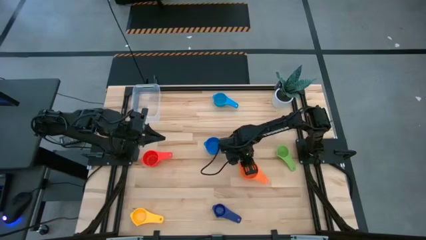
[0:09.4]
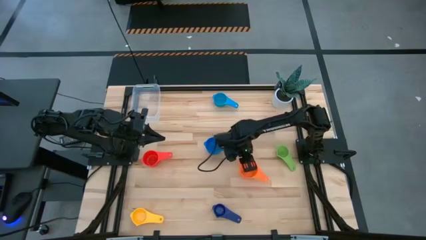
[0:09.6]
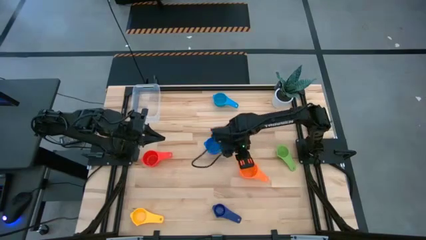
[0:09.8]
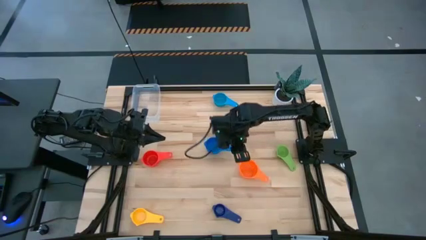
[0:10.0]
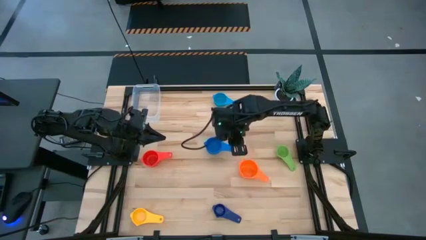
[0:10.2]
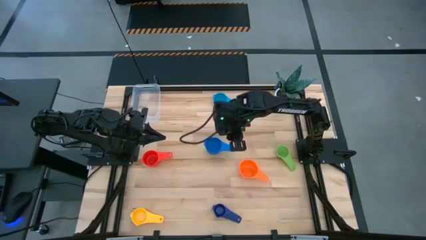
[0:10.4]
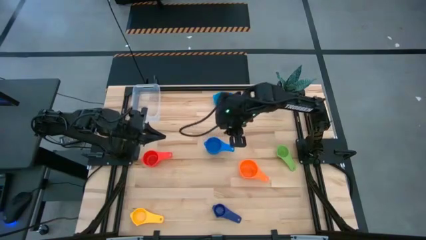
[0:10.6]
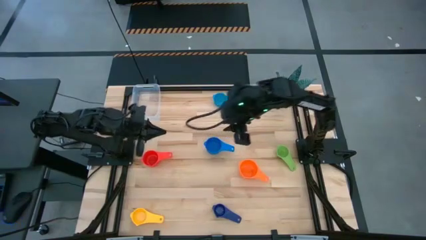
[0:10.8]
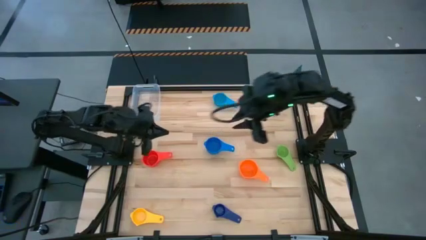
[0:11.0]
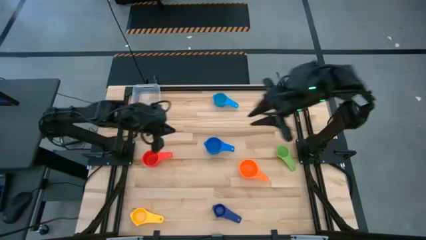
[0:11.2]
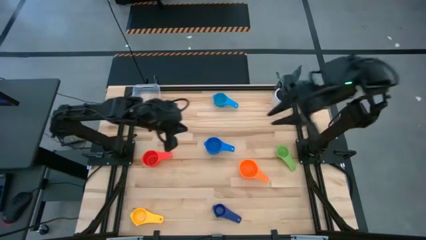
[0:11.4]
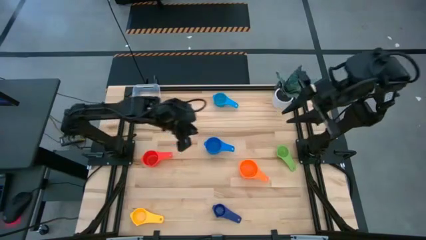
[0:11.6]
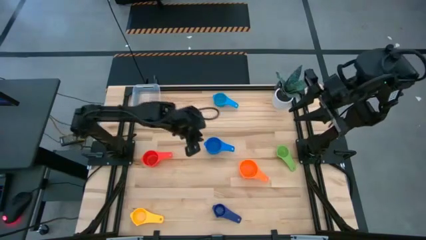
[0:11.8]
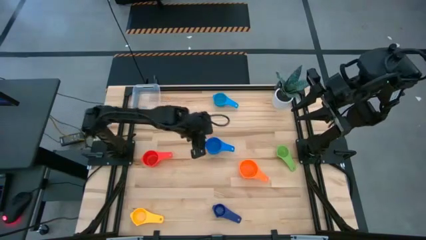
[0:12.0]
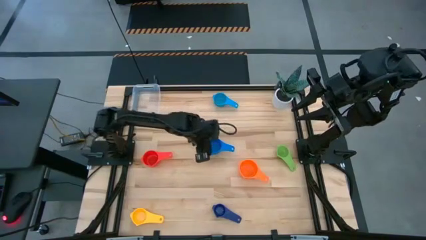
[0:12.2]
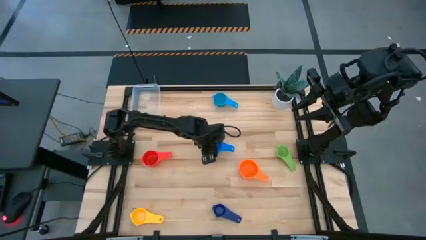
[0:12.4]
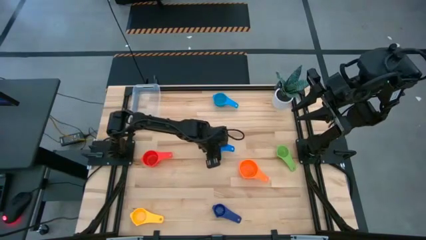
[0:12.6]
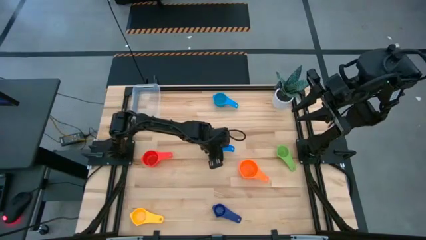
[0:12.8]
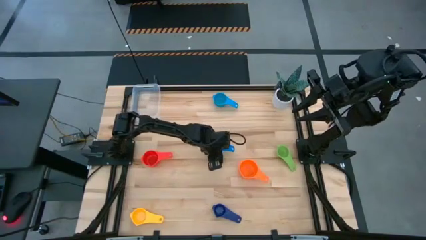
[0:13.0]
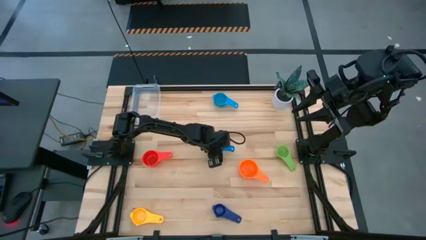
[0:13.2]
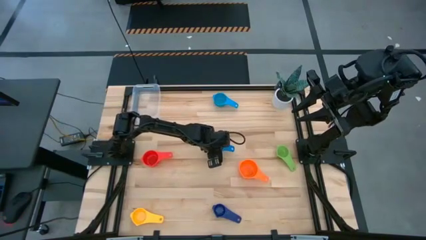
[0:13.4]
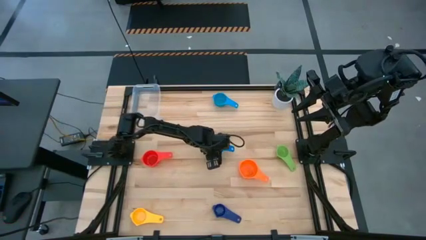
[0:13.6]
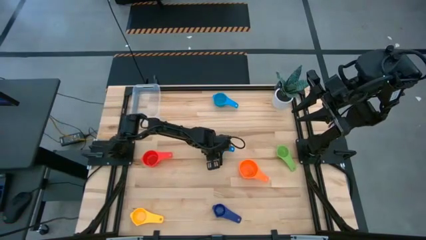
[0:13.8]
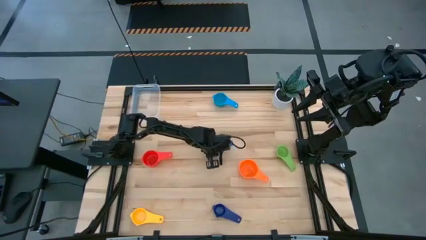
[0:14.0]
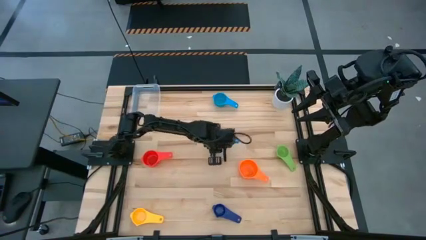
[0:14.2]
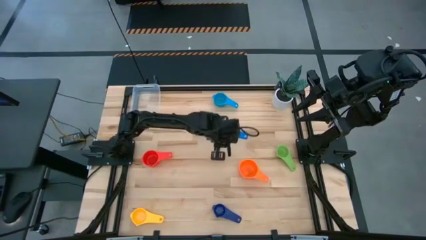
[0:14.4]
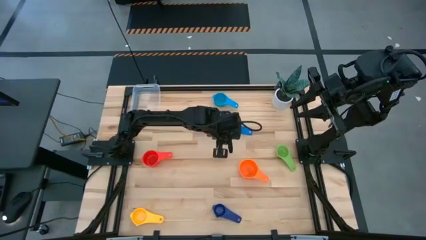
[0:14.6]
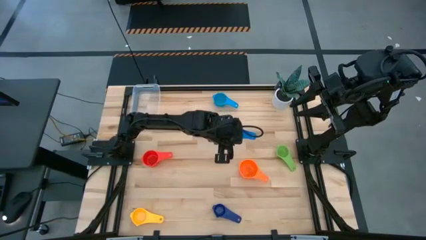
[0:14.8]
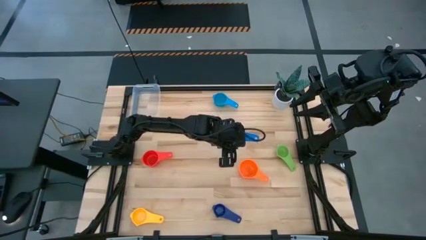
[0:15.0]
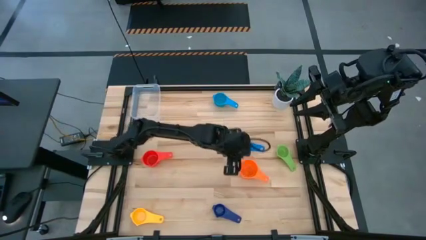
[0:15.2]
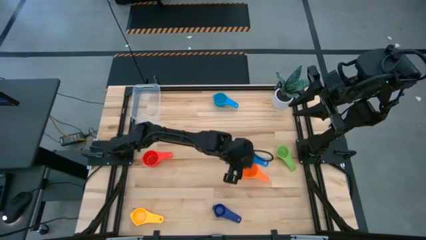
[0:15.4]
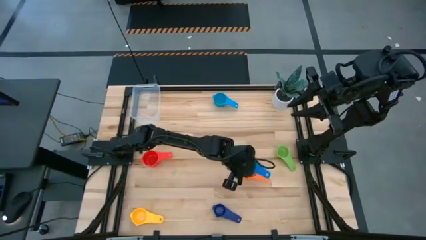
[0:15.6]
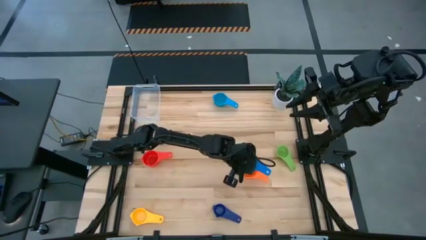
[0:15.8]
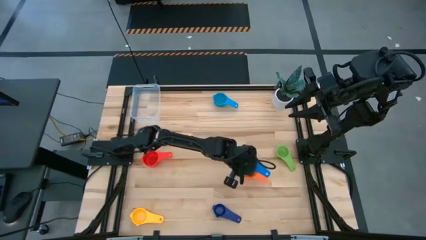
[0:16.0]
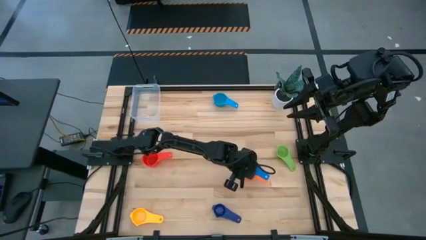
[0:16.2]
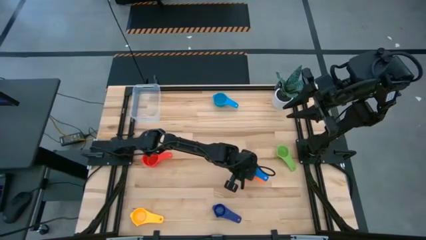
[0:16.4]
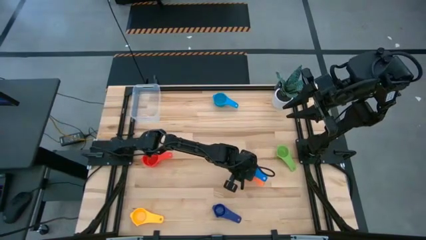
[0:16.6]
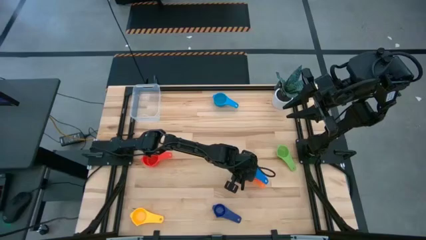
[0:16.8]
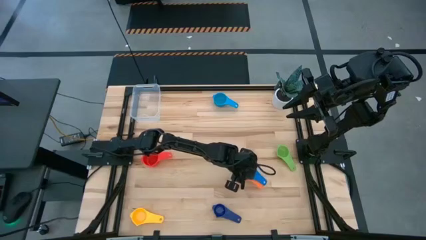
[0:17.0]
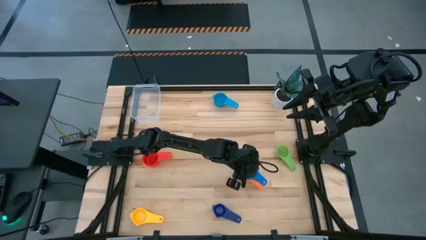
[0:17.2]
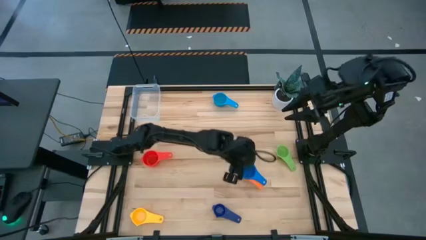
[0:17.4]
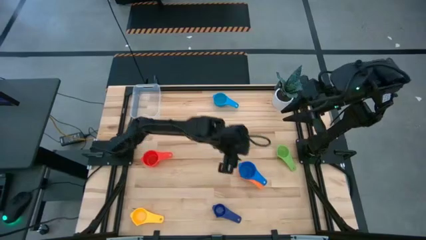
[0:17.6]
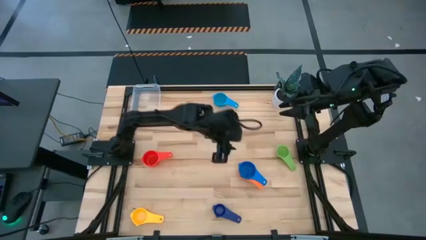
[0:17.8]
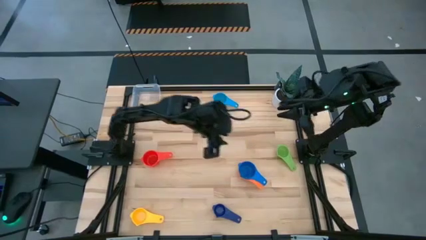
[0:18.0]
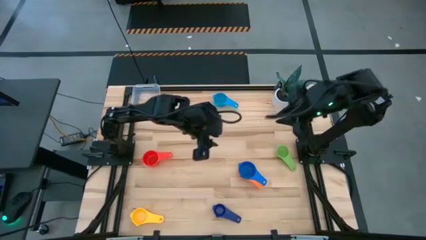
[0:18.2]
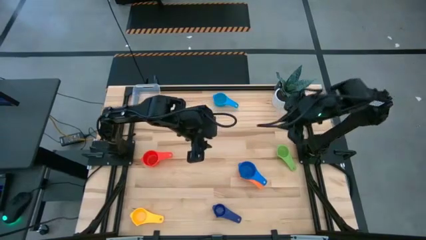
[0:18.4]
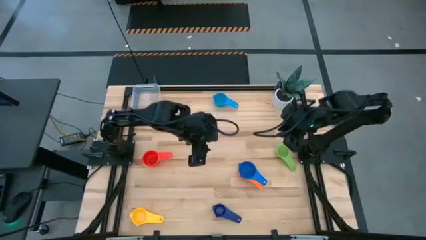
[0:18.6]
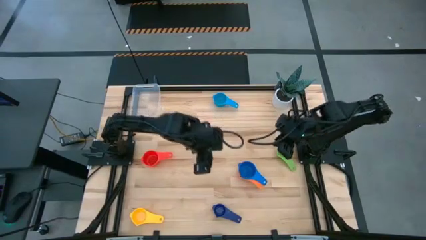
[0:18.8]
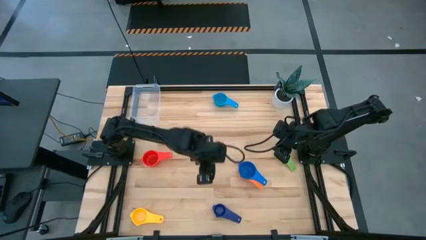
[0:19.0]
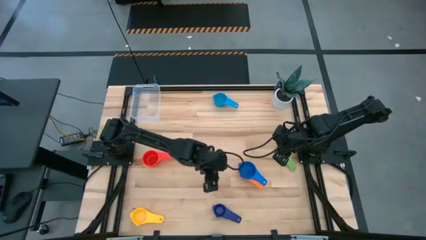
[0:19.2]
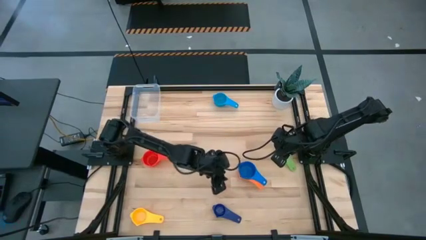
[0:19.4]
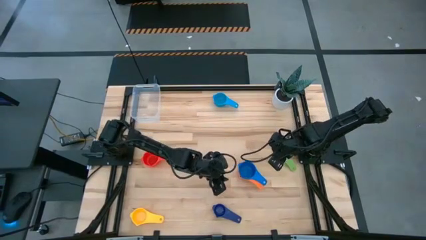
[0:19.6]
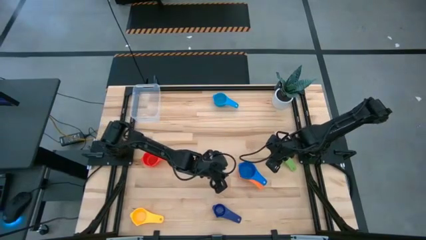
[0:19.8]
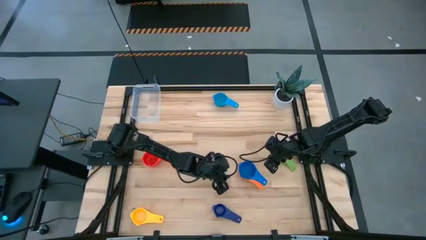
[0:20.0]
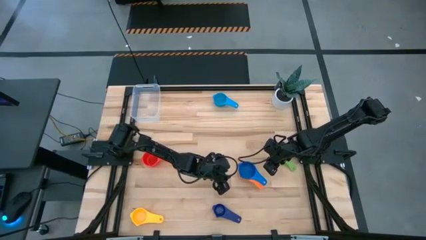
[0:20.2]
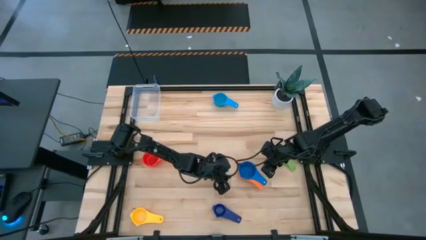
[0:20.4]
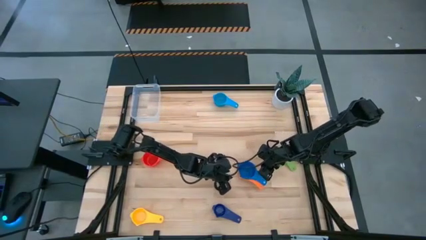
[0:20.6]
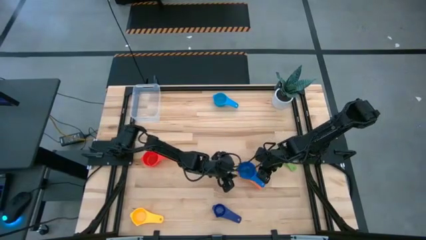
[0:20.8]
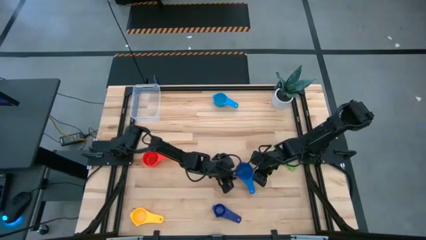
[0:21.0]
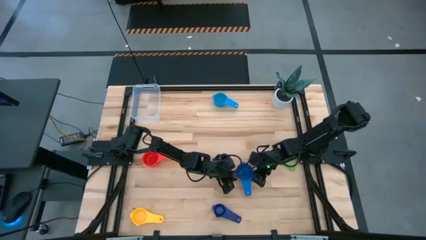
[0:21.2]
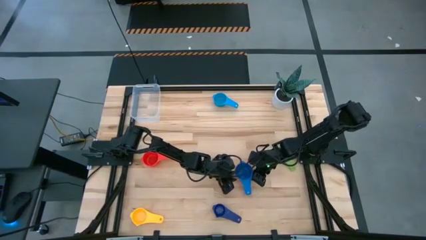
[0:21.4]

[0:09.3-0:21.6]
Task: Nest measuring cups in basket
Stack the blue measuring cup on top of the orange measuring cup

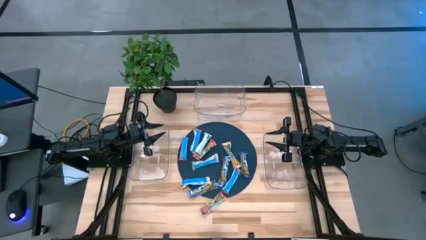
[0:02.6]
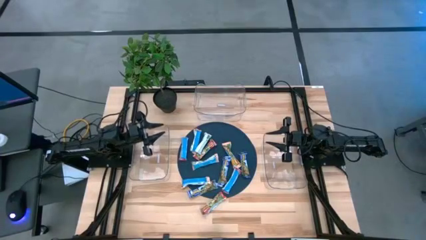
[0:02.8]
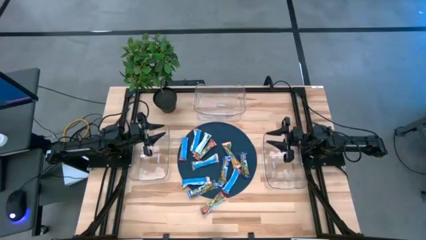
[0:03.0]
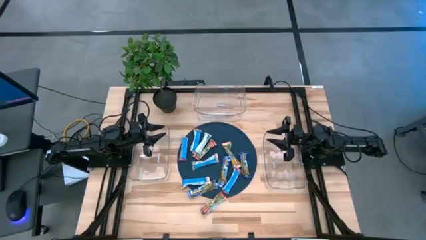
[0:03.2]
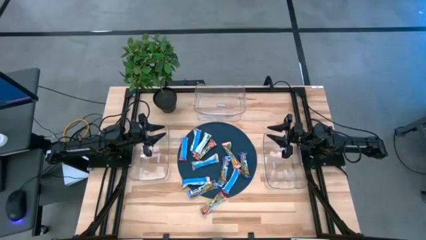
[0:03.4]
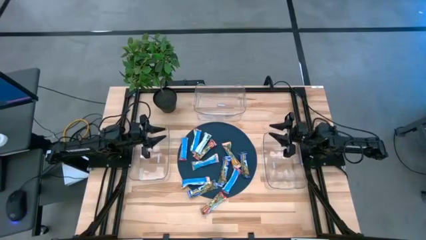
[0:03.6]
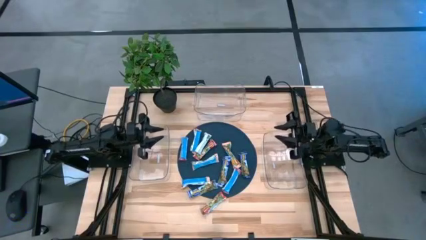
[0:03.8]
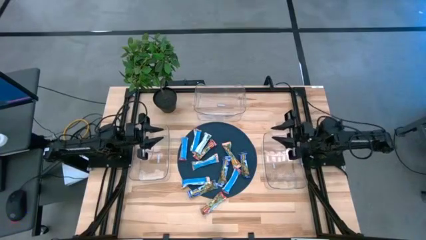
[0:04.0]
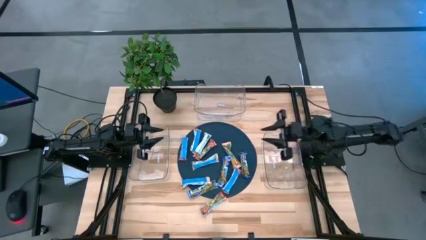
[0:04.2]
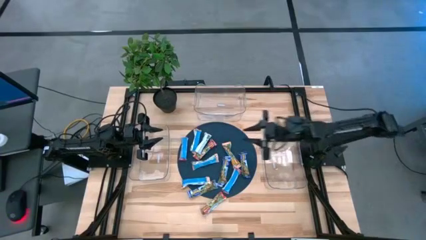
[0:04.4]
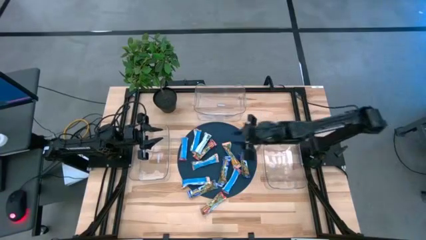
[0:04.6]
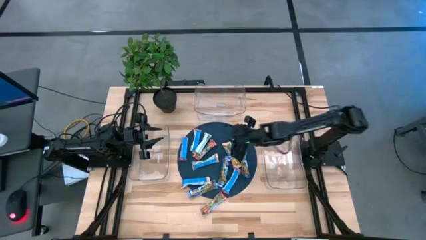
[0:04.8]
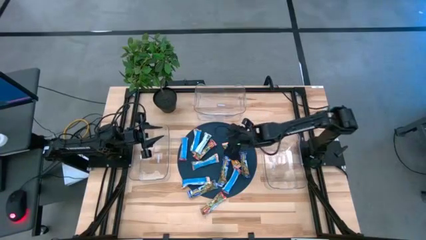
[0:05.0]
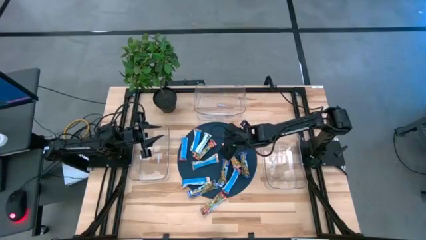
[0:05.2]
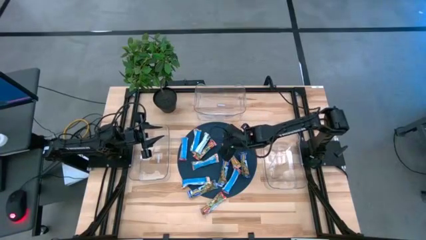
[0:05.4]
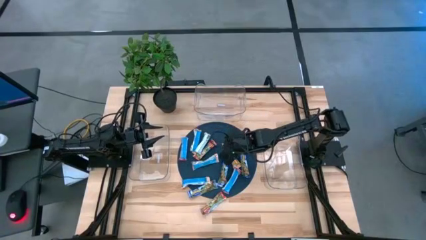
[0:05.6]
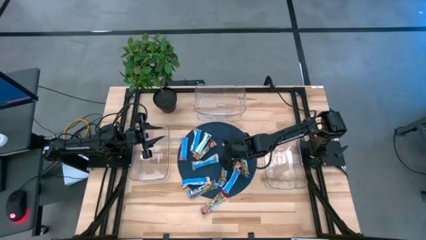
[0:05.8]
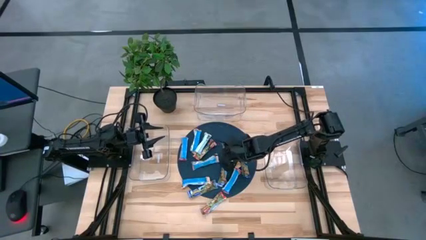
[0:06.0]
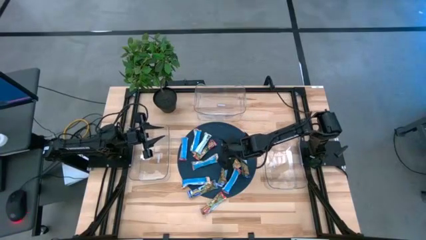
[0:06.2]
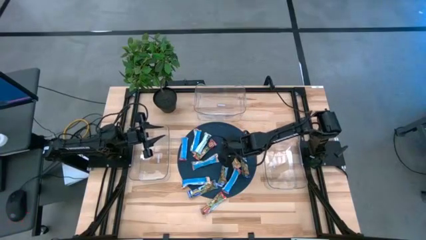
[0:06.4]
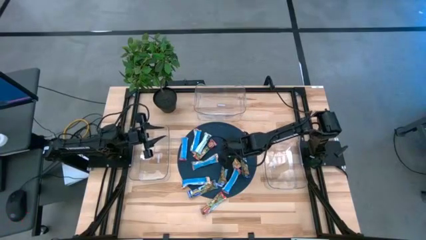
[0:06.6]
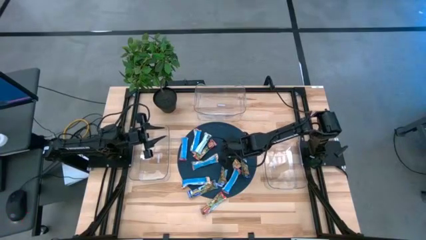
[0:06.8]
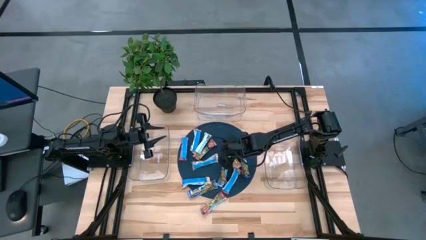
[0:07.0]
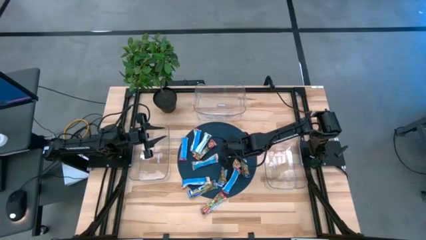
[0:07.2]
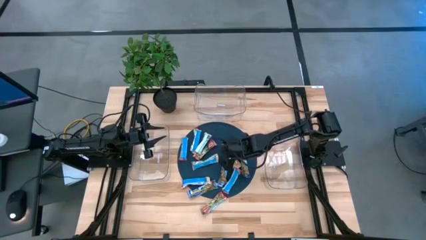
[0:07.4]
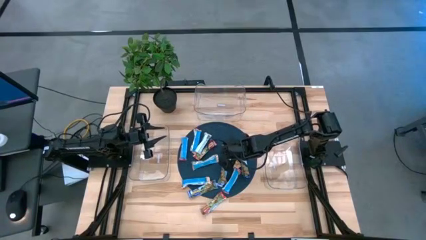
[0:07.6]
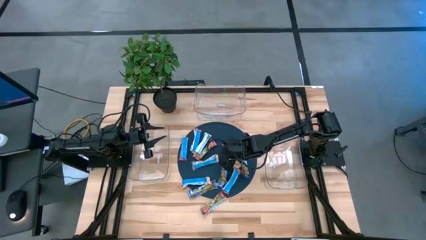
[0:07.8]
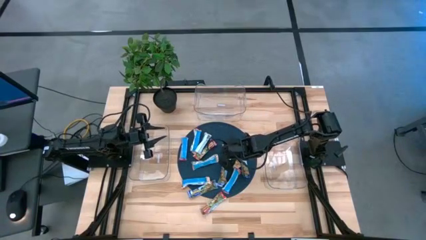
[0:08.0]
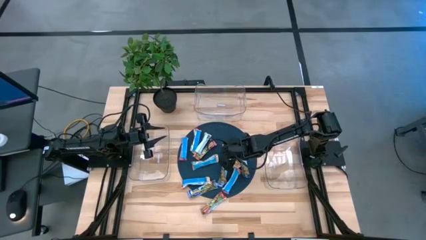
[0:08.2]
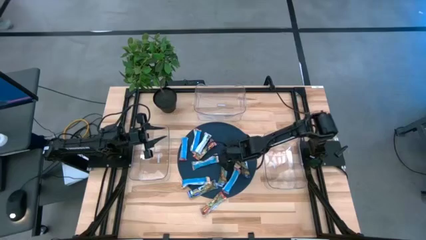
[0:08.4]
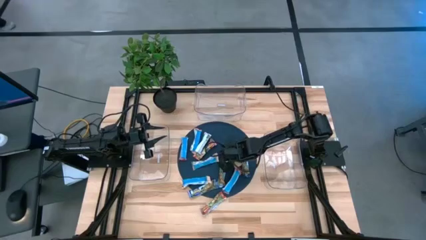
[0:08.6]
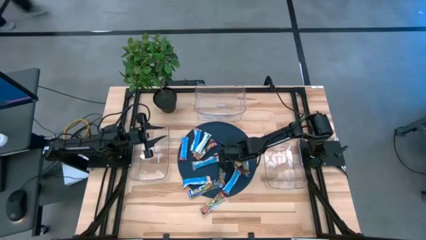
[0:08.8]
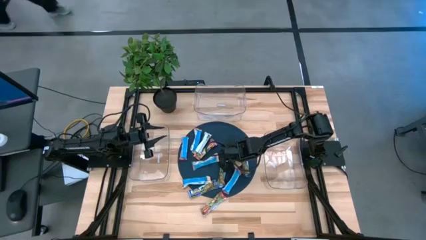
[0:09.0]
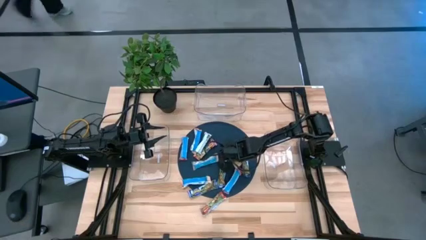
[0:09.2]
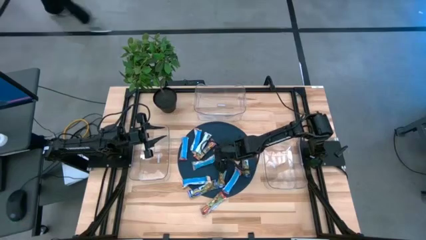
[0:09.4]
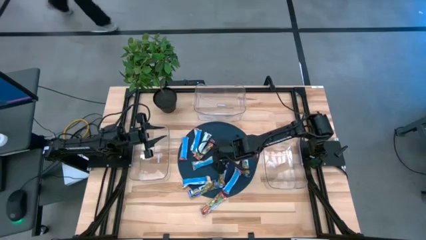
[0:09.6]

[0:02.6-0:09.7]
Task: Pick and place Granola Bars by type
Put the orange granola bar into the right transparent bin
